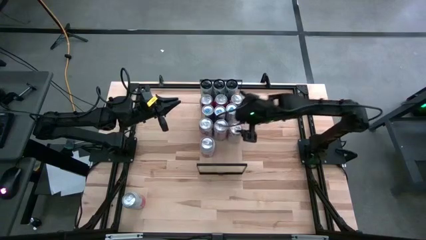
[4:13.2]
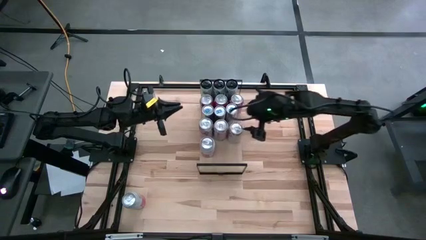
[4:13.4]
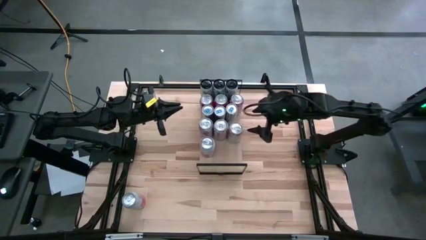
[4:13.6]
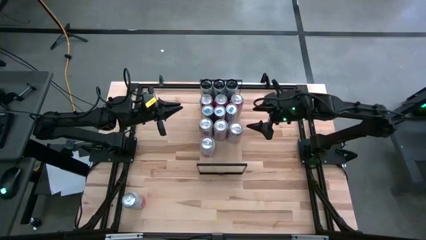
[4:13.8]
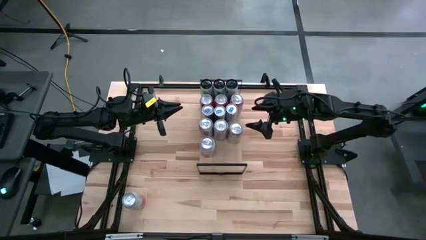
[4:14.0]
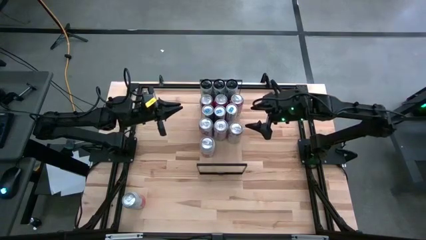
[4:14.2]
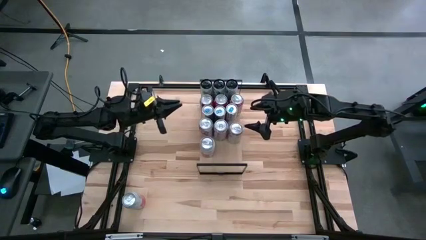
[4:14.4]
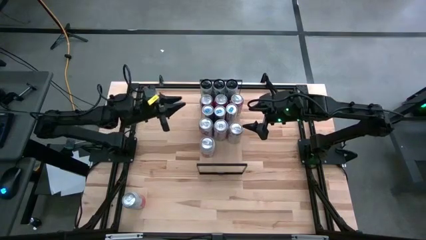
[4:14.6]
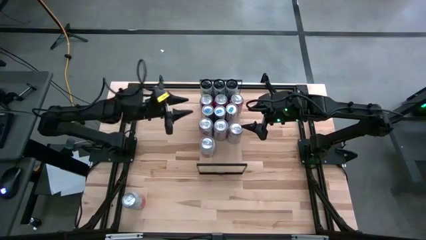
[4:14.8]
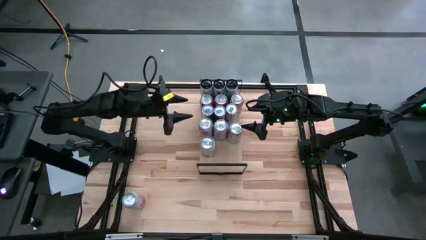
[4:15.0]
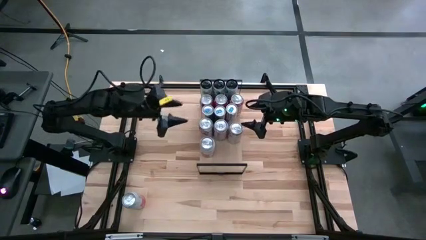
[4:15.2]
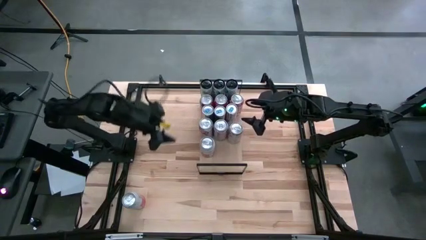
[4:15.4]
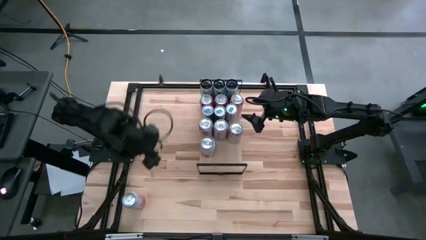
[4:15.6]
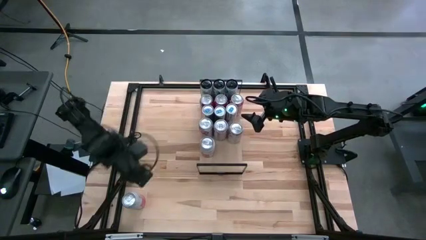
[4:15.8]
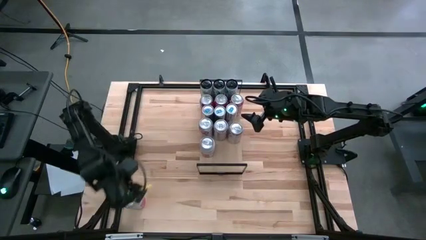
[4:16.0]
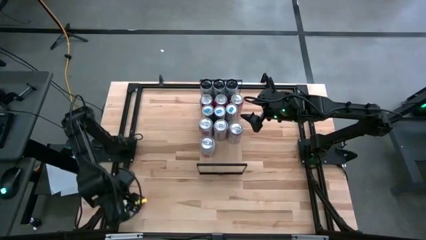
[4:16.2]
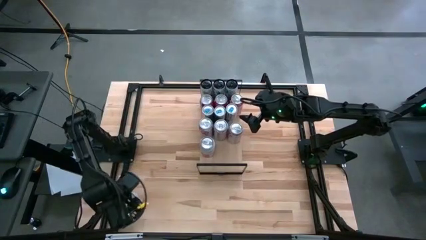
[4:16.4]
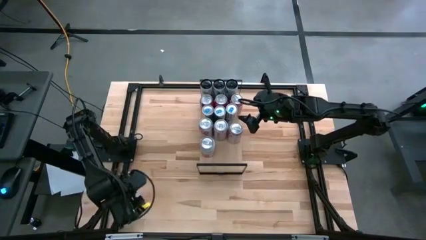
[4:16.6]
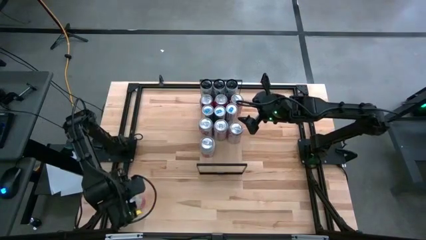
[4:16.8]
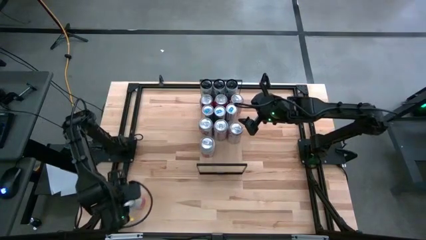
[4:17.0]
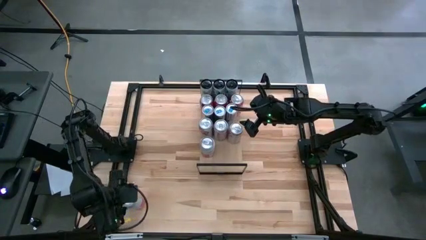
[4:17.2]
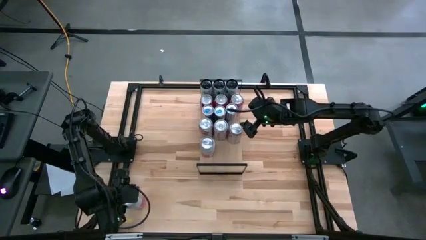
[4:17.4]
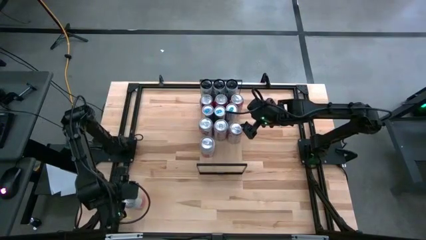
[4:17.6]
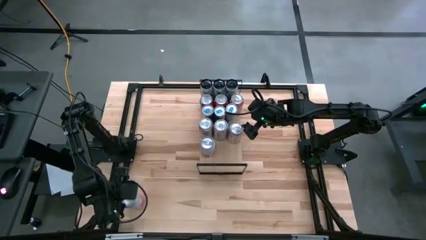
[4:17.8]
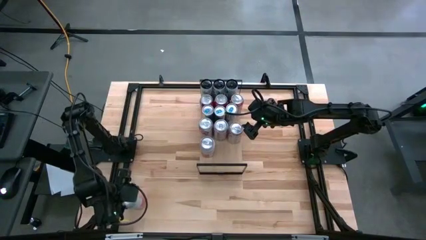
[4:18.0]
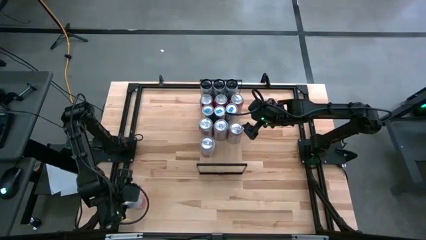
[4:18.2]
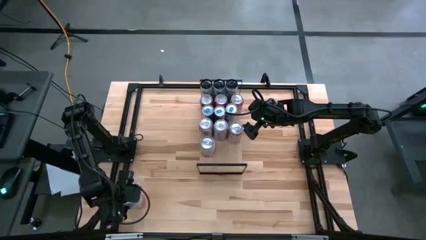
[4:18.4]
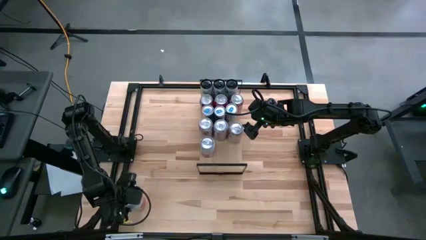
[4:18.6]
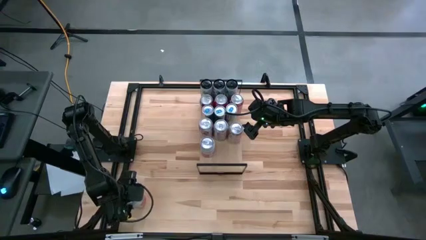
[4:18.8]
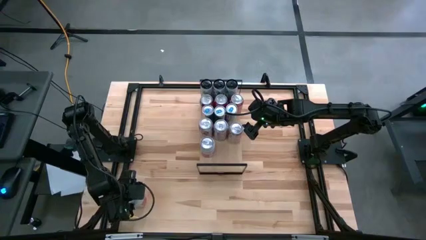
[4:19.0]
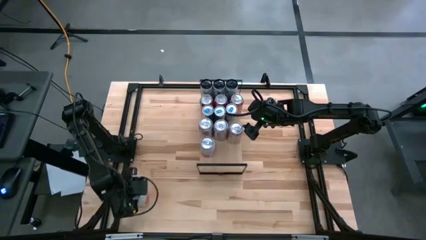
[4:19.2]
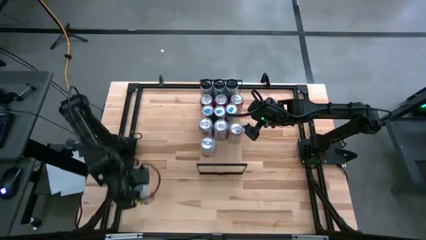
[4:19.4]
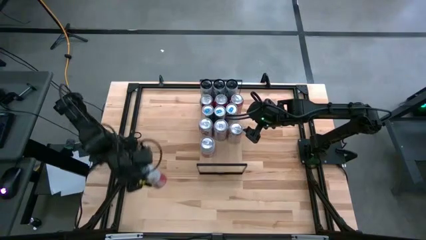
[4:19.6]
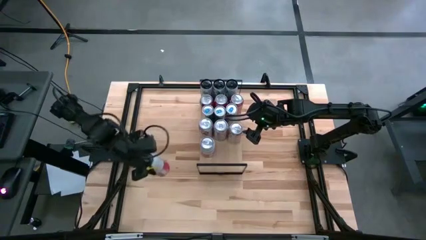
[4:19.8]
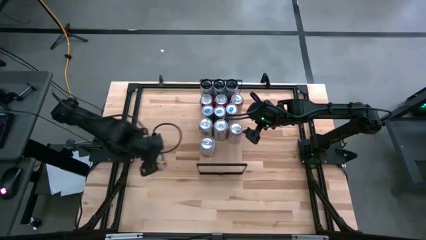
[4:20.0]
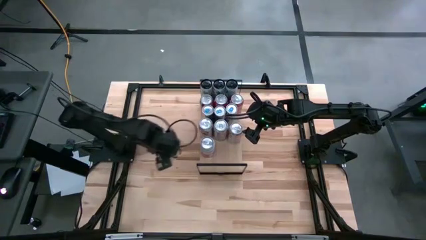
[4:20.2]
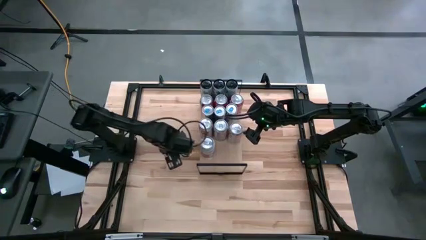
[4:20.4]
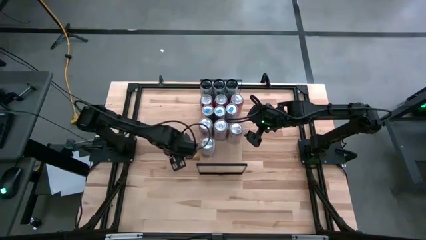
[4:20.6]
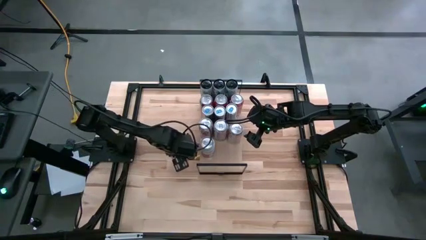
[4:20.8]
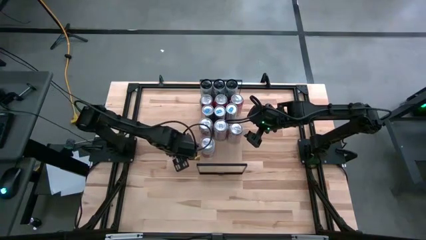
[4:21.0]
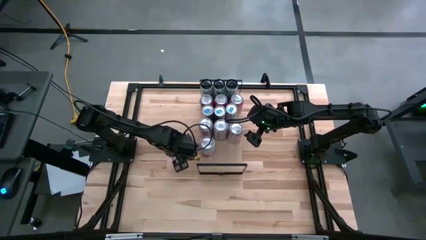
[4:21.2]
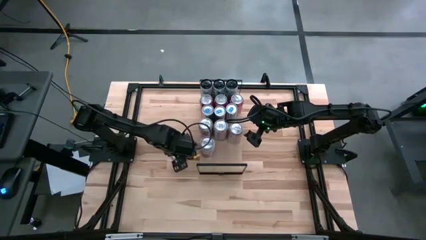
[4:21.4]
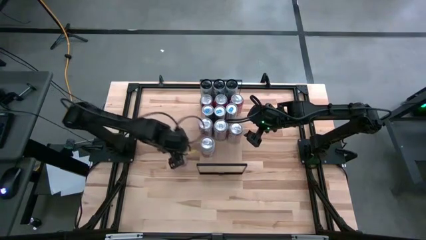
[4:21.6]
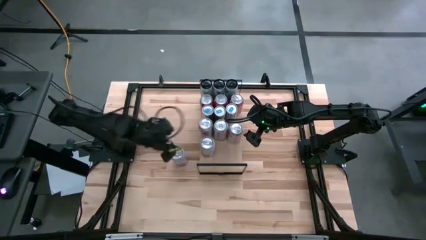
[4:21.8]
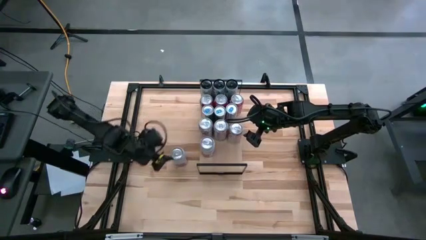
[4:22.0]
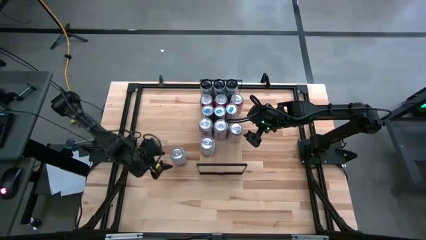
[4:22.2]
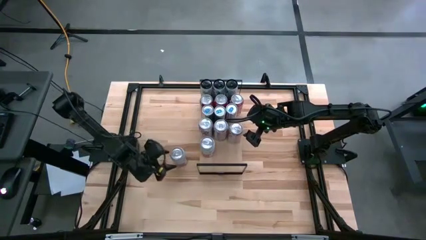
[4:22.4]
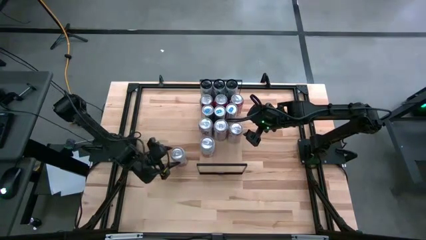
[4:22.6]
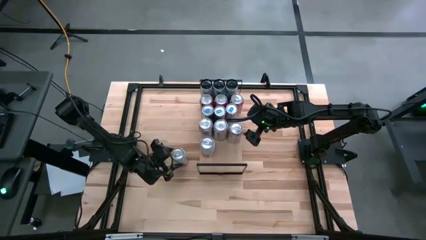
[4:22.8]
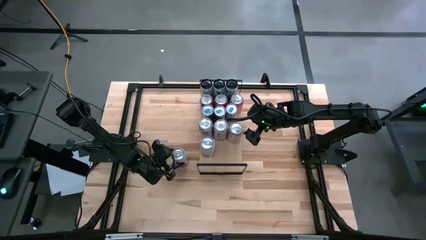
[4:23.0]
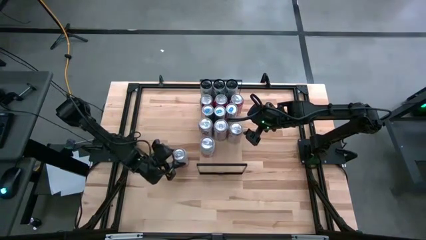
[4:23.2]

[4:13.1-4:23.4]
Task: Place canned beverage on shelf
Put the pink-white soda can on the shelf aligned with the other pink-white soda can

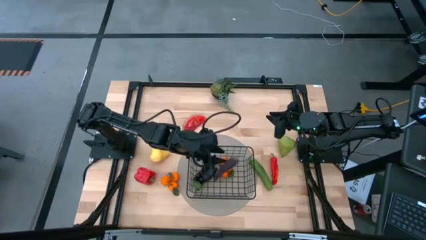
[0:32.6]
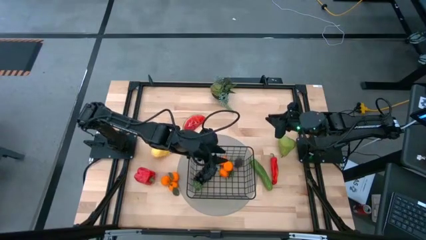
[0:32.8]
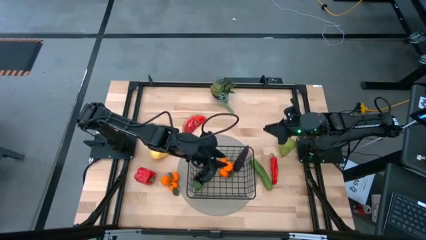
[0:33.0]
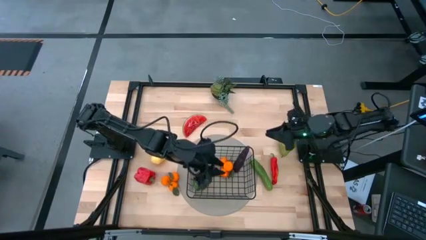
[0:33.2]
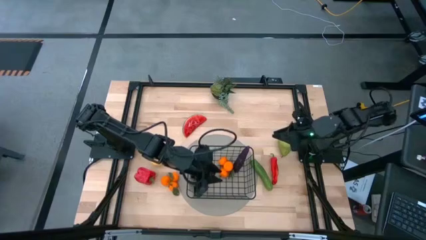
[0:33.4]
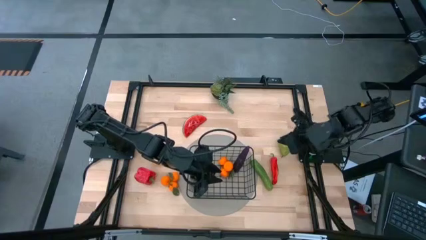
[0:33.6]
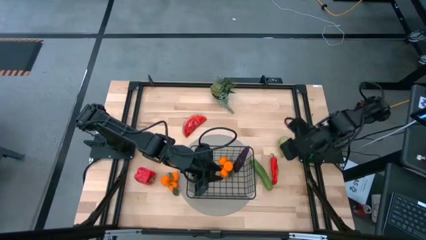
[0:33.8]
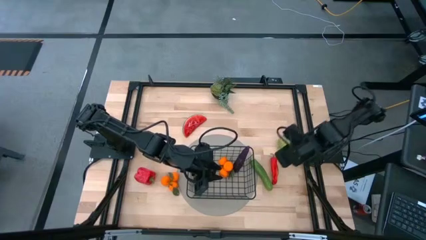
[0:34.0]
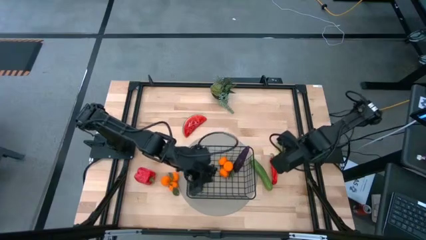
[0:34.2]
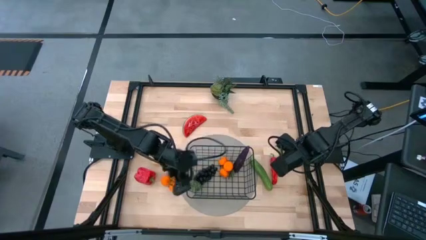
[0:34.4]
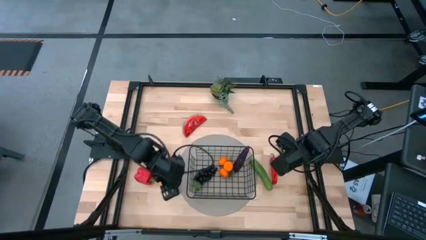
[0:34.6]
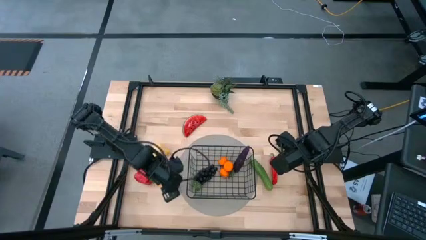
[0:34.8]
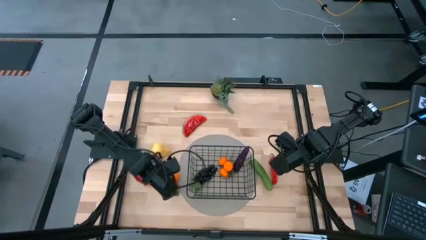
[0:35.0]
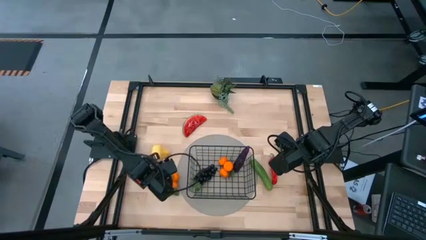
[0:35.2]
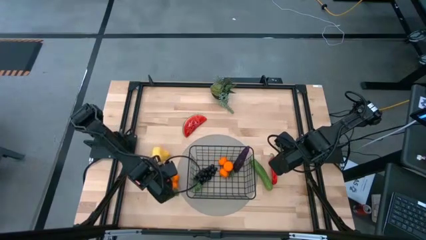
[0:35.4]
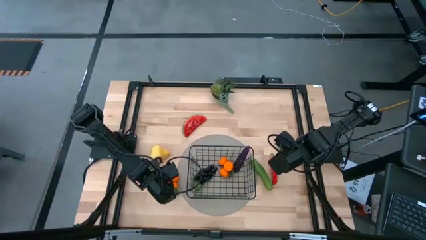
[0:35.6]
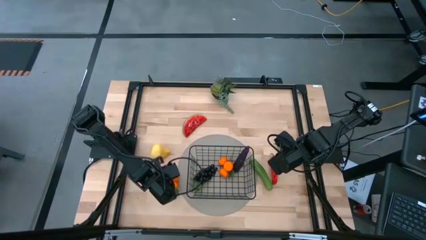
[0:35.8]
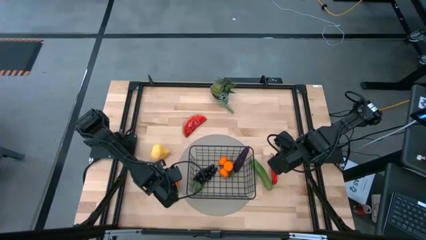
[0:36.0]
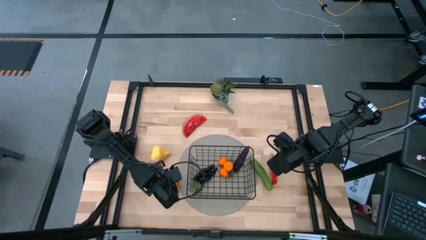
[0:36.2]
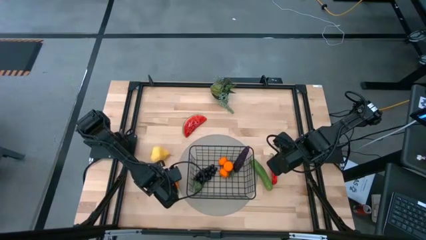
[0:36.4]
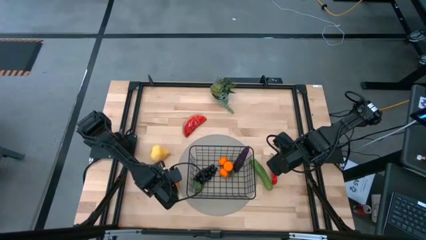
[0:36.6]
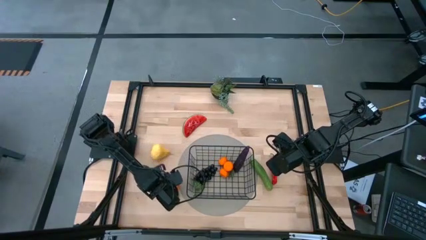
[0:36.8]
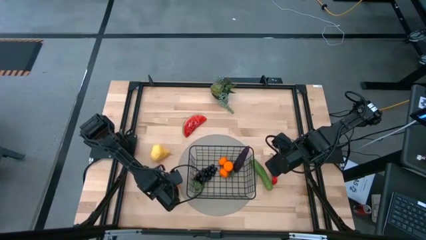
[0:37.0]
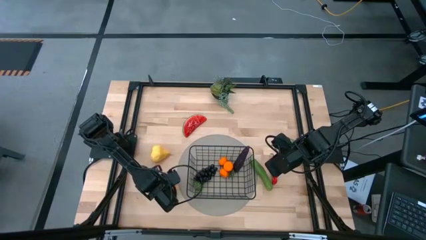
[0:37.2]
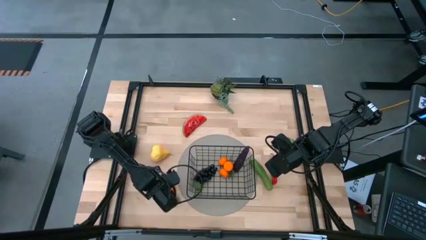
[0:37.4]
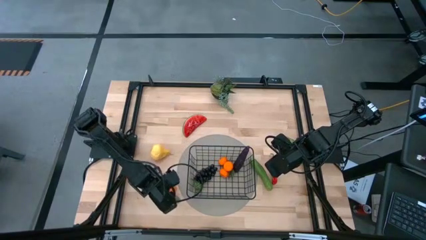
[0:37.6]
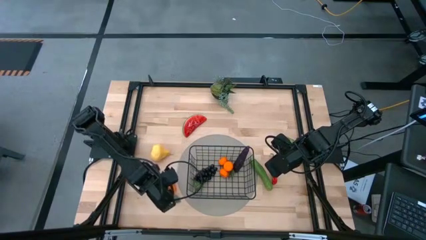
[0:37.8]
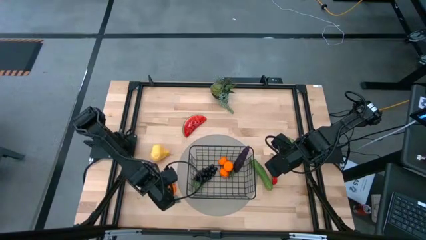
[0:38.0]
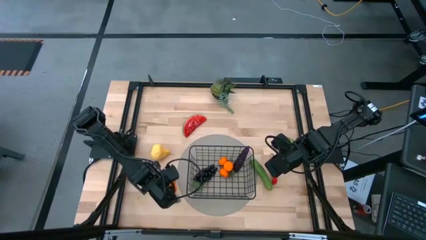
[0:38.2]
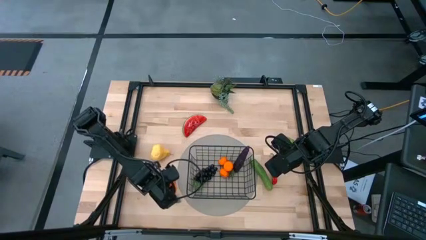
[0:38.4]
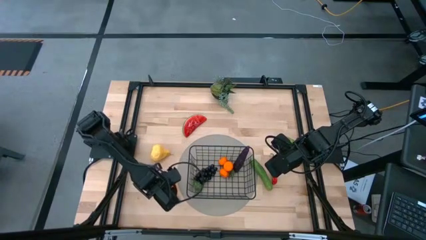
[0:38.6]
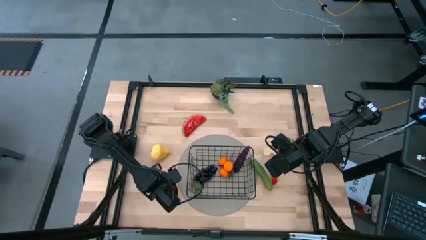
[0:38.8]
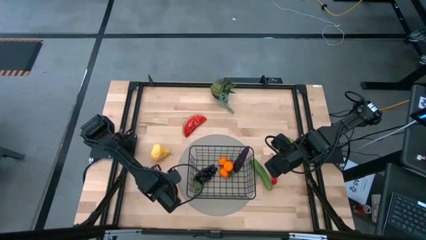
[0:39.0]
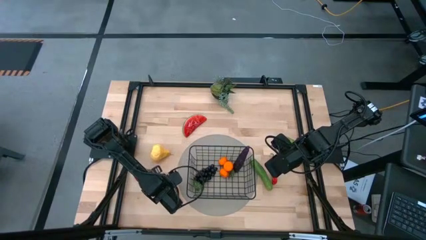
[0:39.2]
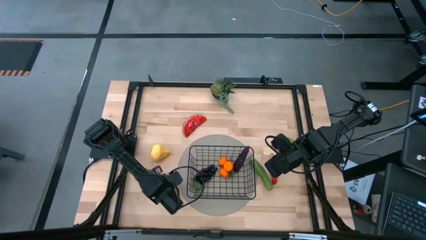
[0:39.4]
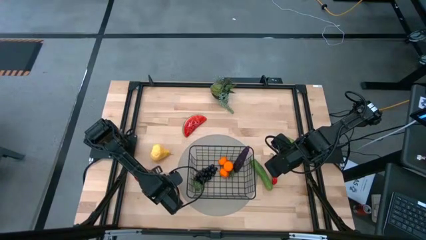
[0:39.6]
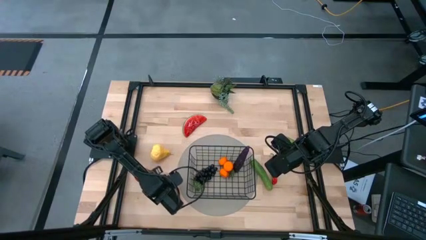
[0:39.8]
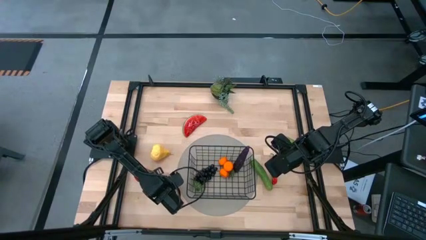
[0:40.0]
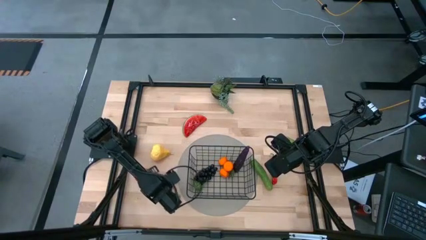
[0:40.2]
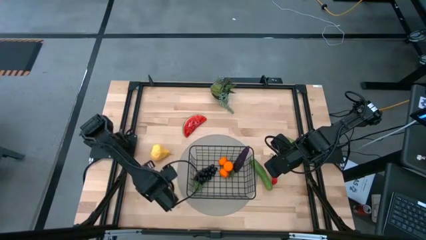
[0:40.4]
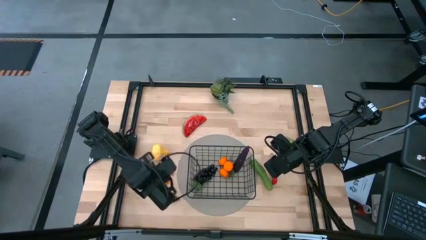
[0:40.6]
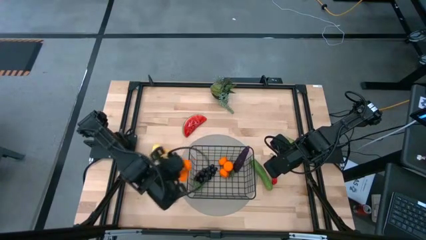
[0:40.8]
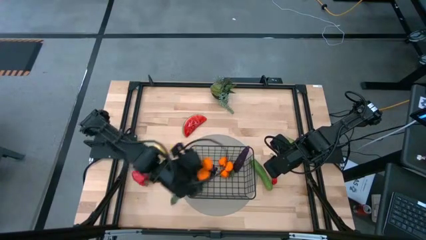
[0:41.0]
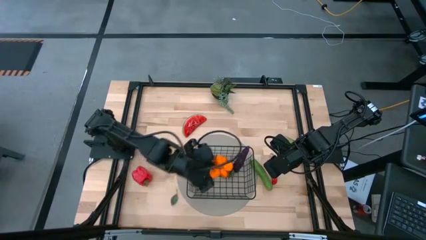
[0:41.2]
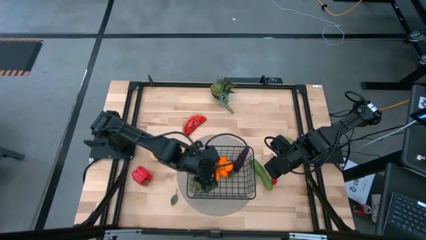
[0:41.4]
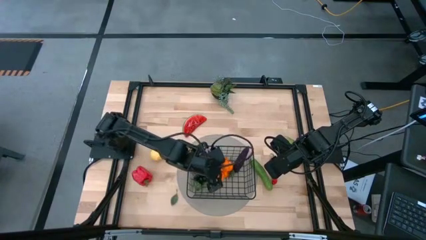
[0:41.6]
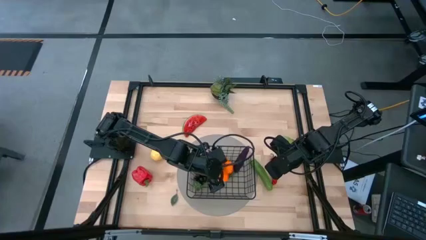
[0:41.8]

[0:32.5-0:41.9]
Task: Build produce basket
Put the orange tangerines into the black wire basket
